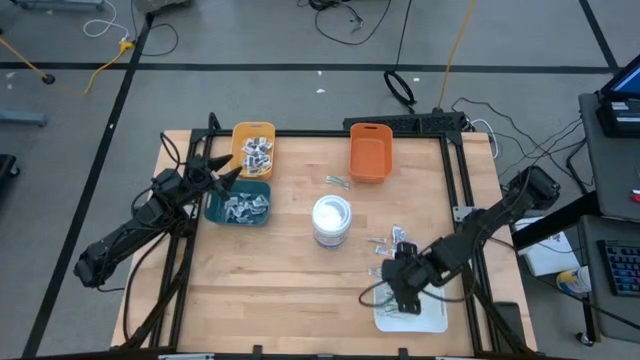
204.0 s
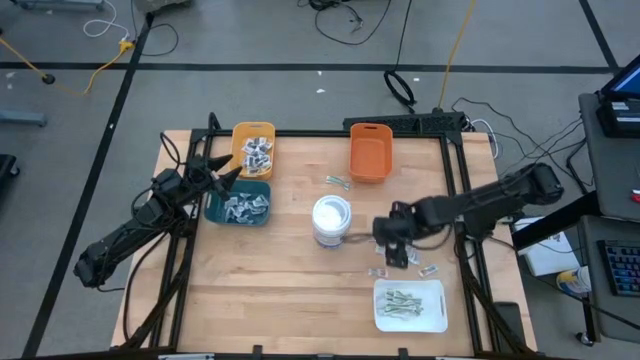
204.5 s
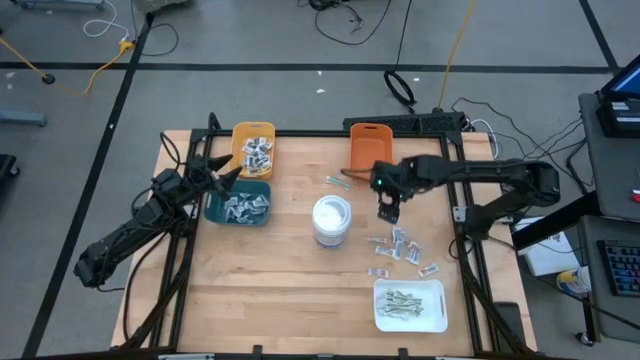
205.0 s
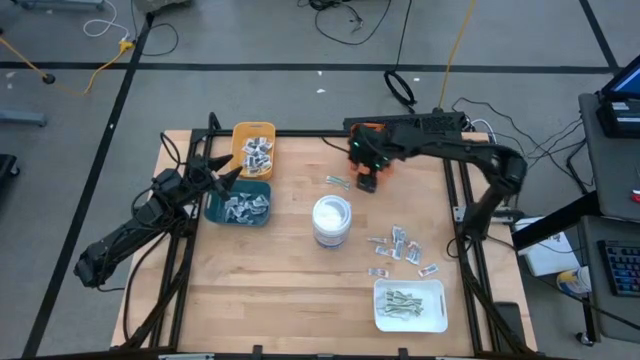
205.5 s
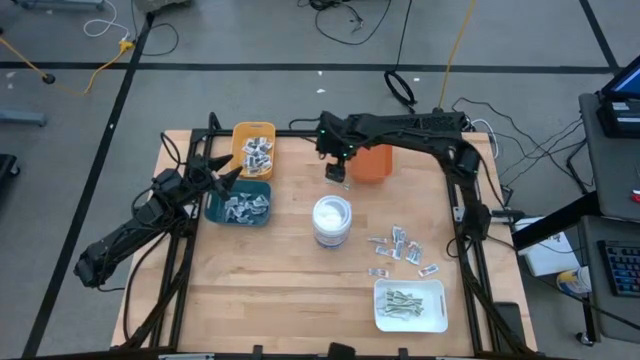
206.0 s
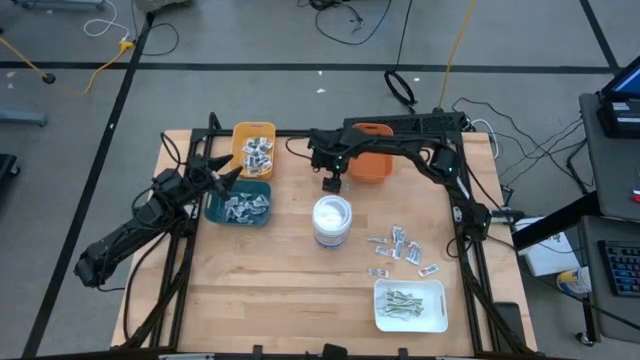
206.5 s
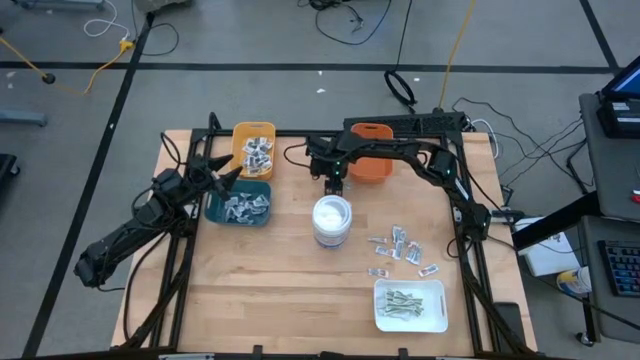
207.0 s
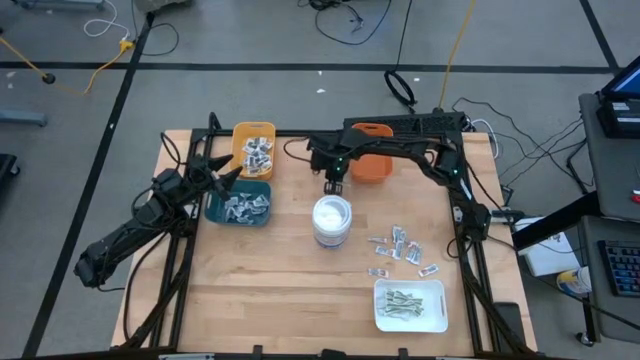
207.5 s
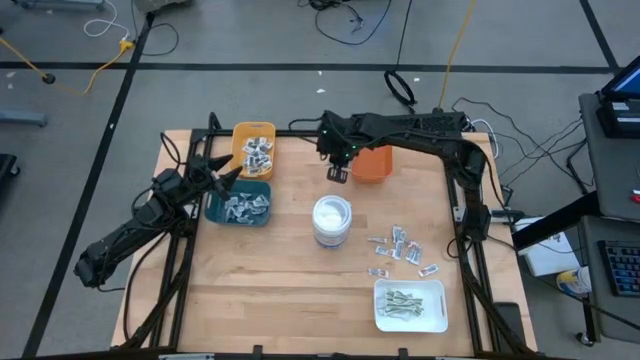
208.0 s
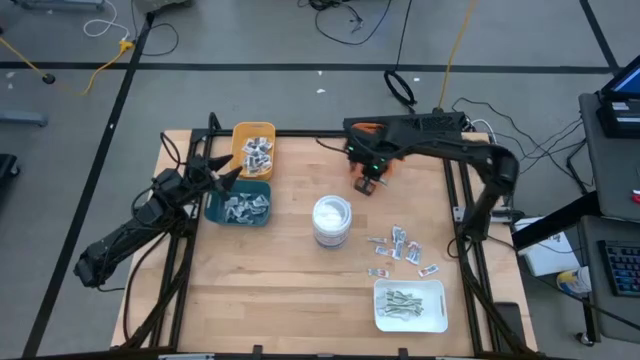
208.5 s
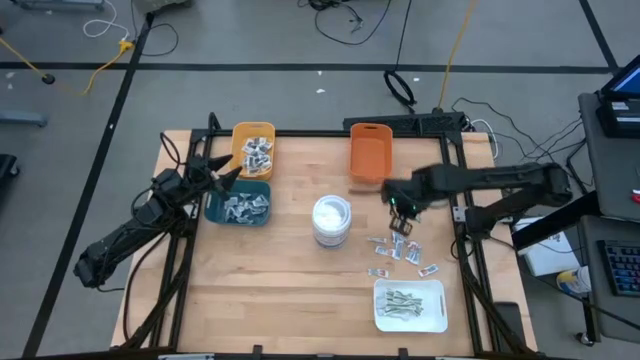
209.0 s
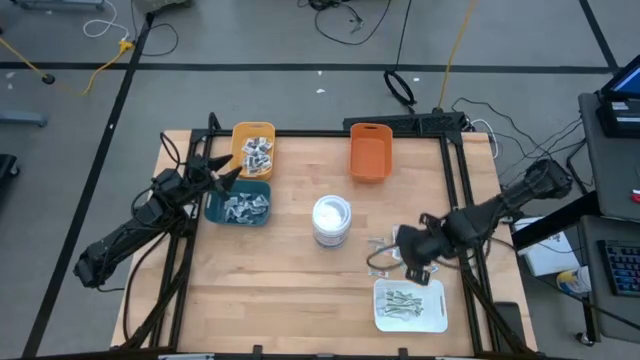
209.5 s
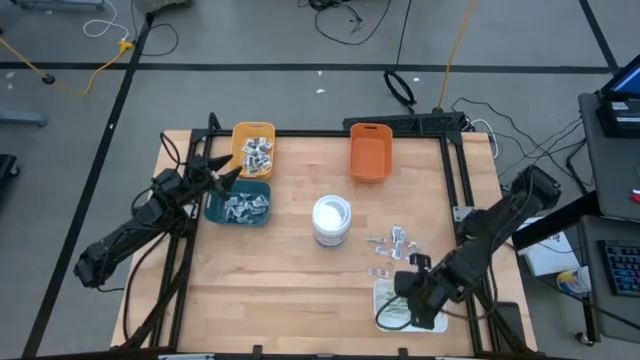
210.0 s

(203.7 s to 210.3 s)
Task: Pick & Place First Aid Supplies
Put the green bandage into the white bin

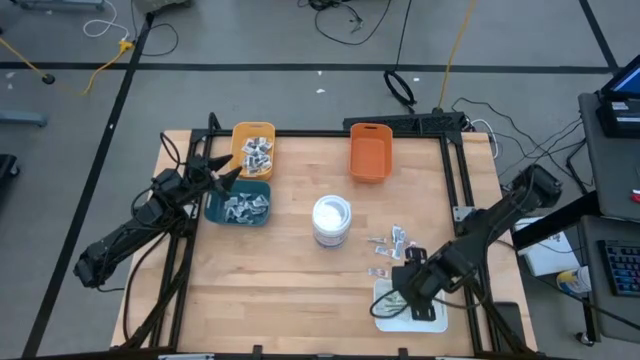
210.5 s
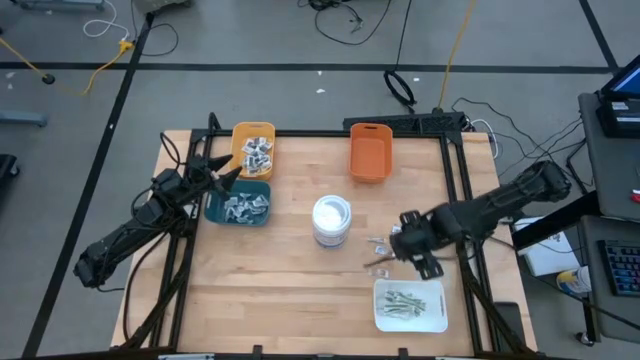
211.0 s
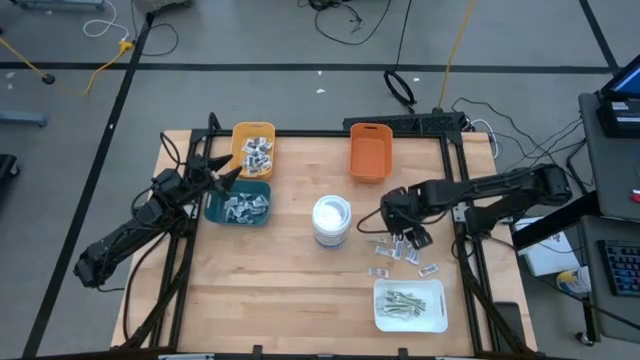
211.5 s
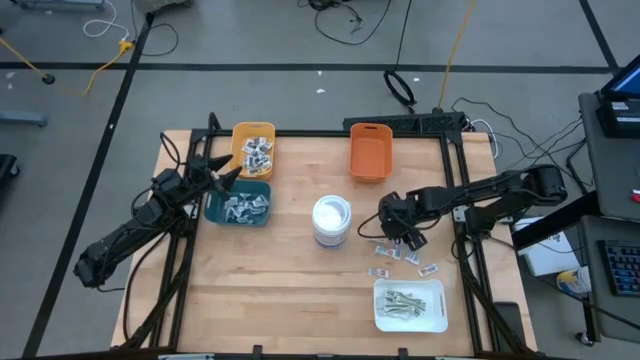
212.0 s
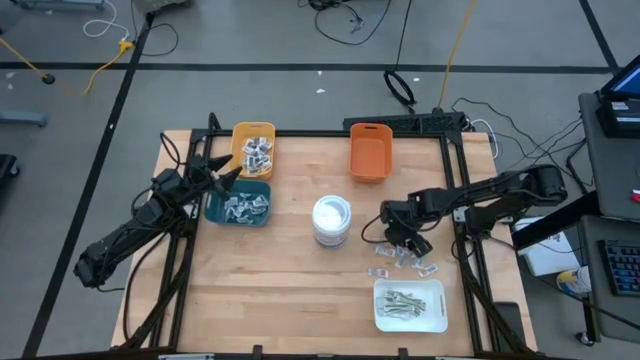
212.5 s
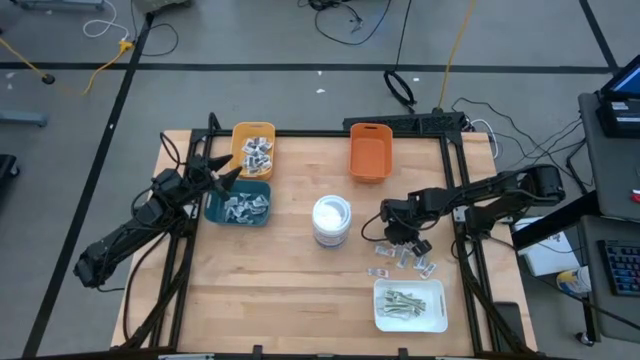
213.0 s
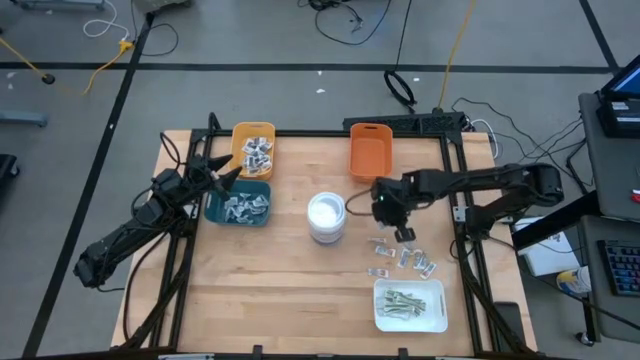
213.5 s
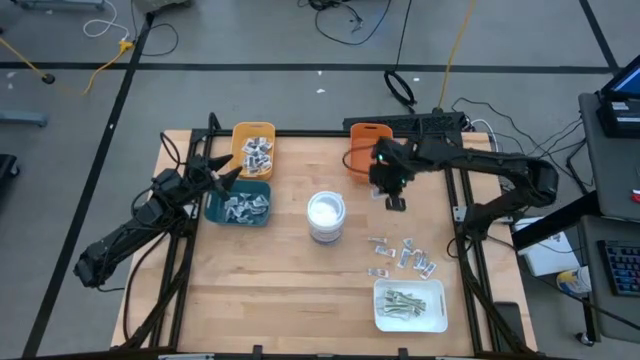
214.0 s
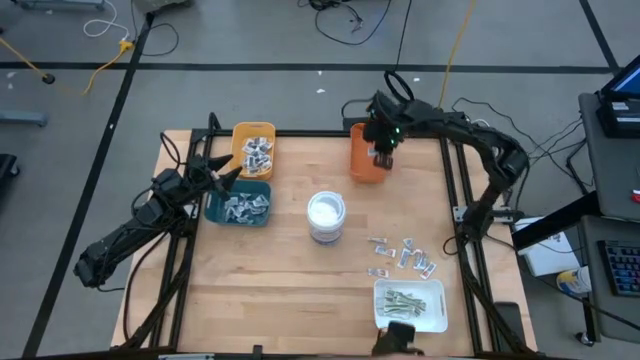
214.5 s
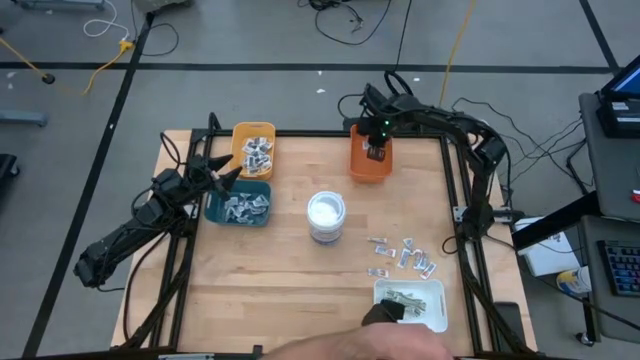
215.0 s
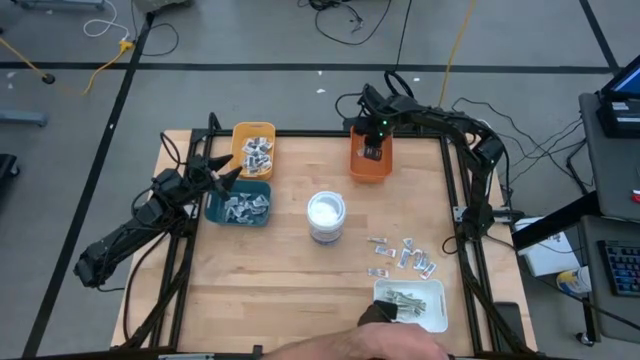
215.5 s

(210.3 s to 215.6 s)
Put the orange pad into the orange bin

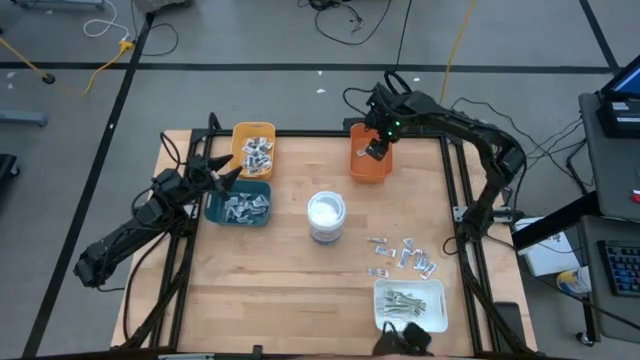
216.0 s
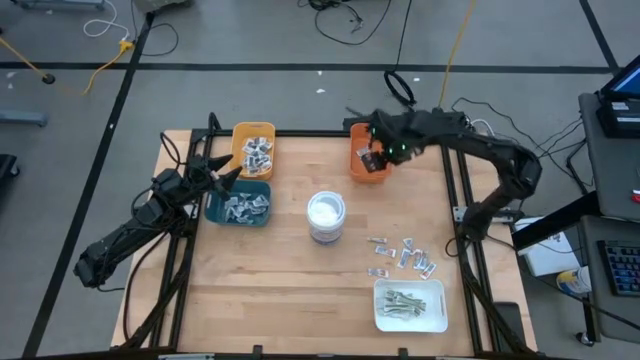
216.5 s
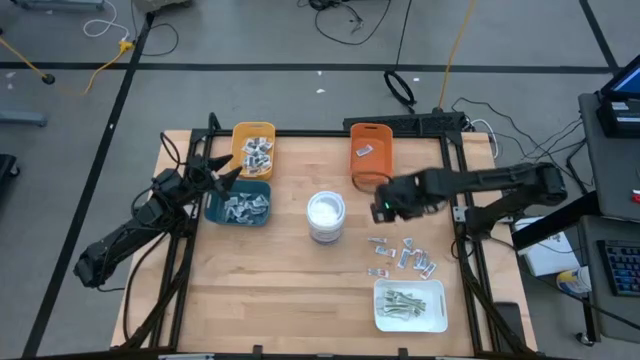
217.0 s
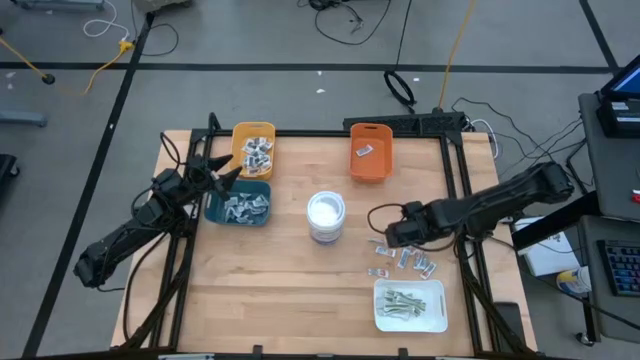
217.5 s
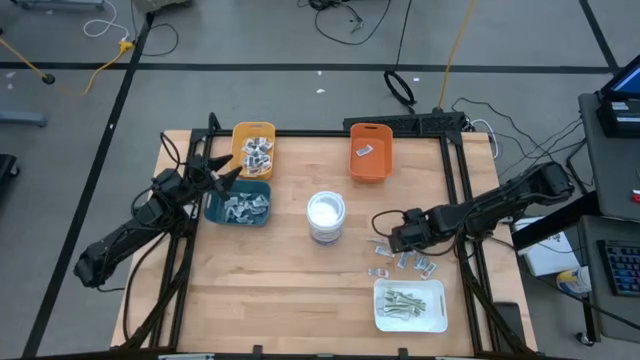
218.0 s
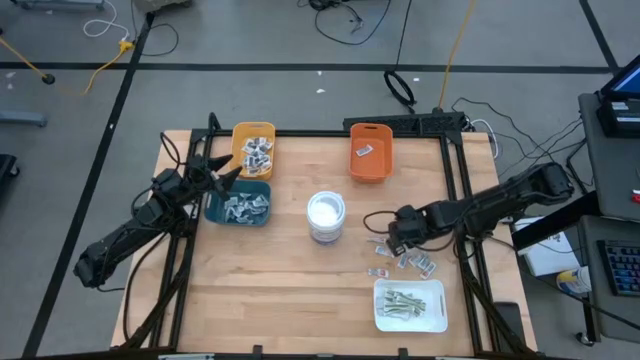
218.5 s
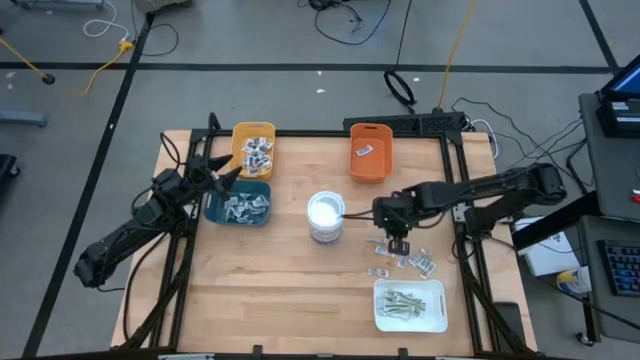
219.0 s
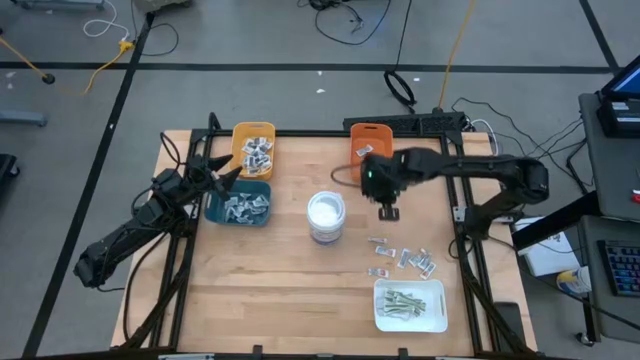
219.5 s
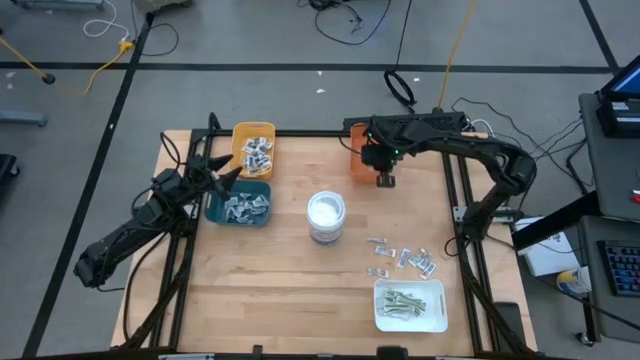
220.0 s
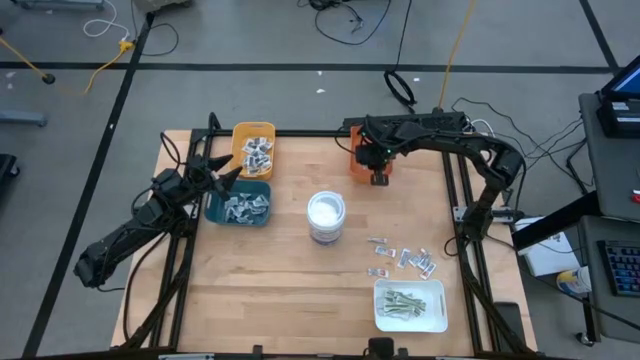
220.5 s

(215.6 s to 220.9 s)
Put the orange pad into the orange bin

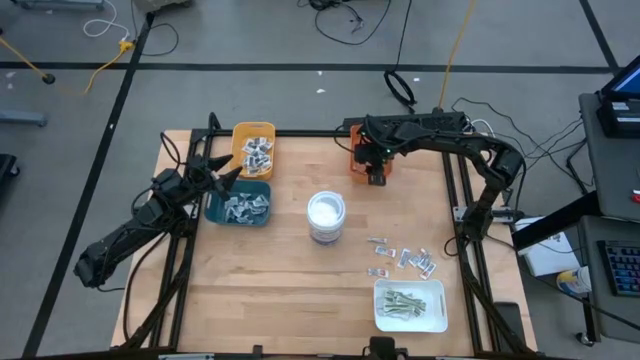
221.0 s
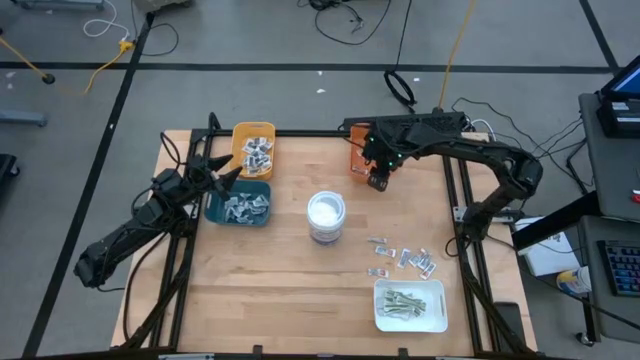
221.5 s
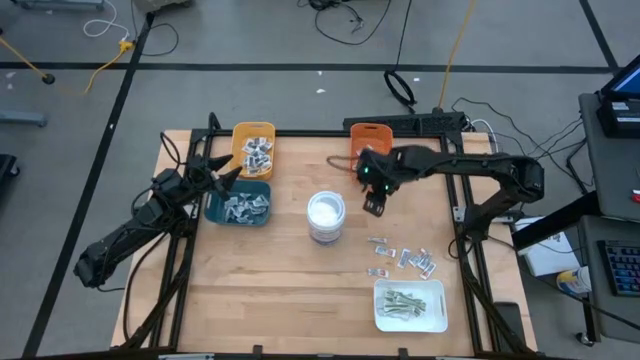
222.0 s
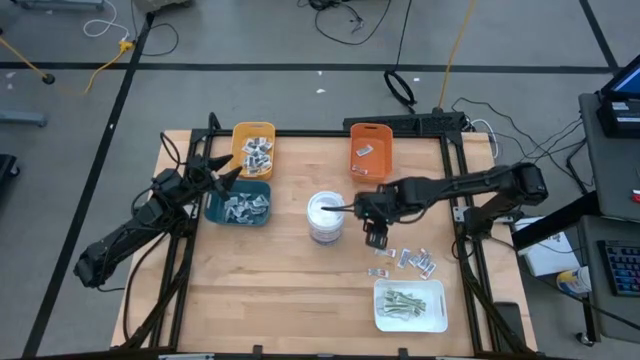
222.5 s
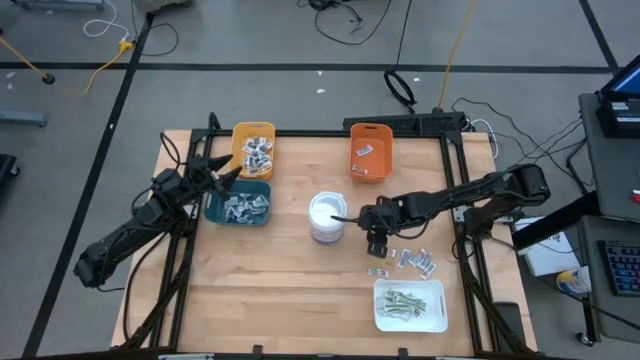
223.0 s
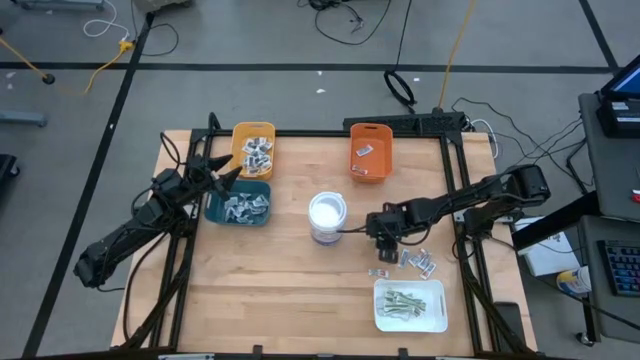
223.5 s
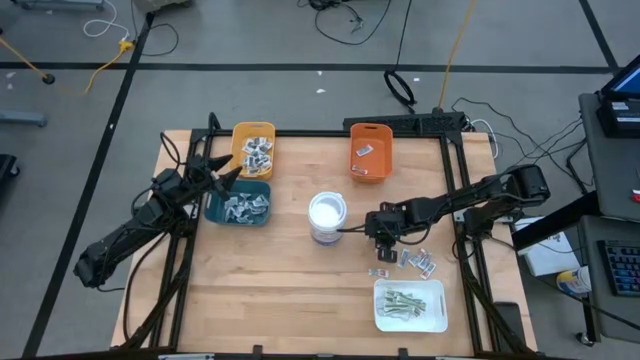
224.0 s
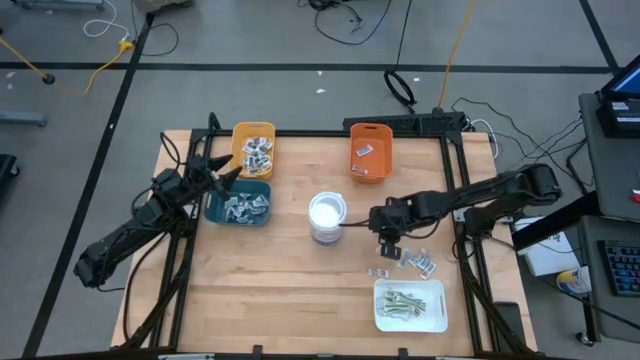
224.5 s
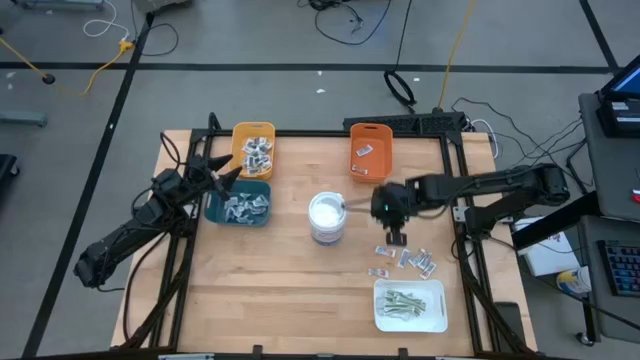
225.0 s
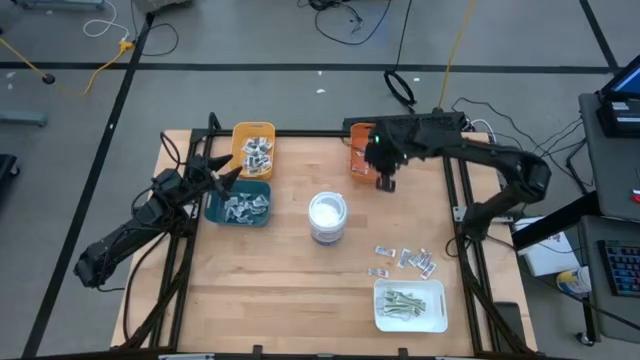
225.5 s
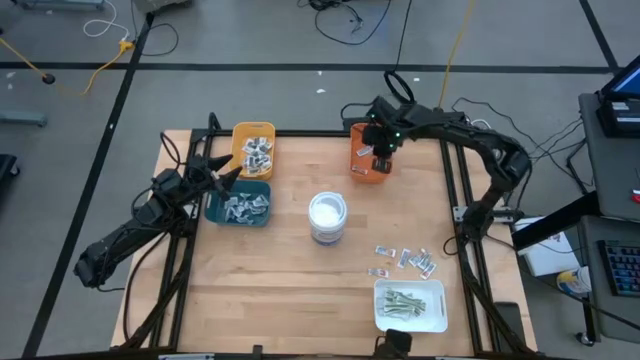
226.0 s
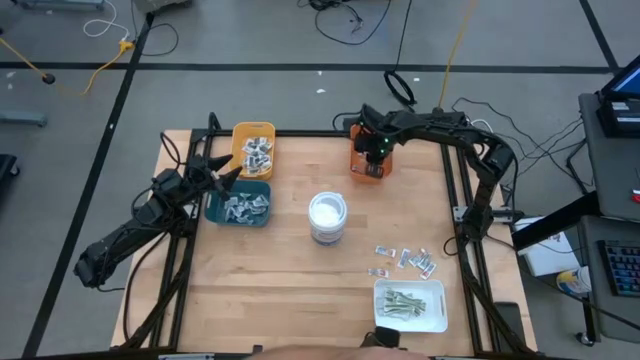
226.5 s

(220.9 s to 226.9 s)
Put the orange pad into the orange bin
